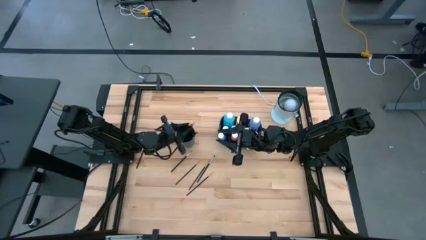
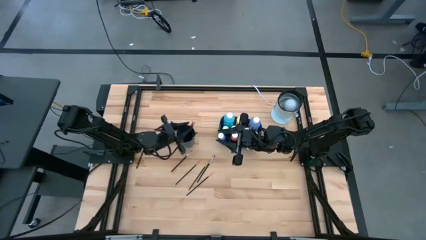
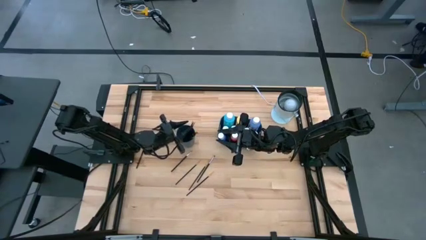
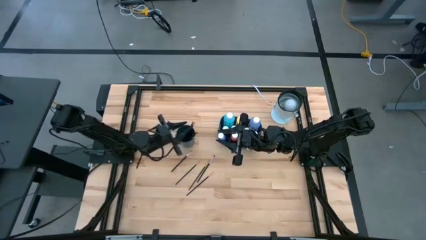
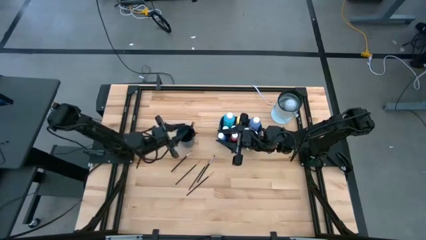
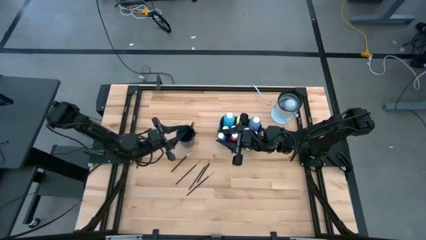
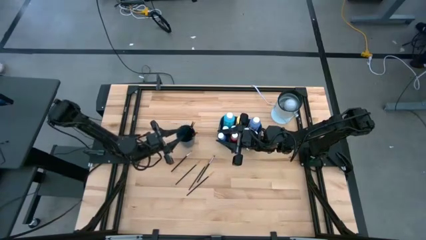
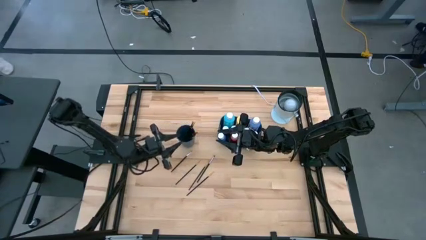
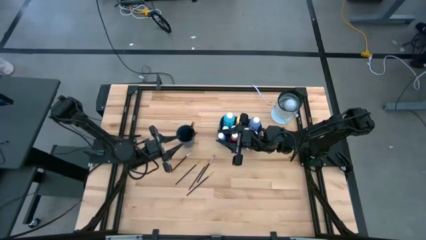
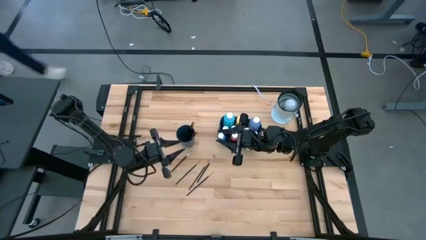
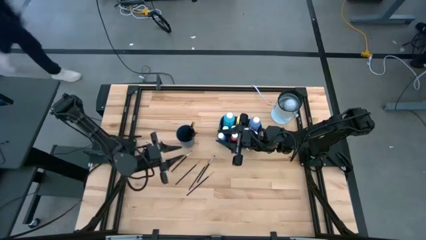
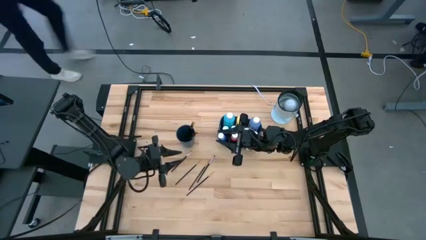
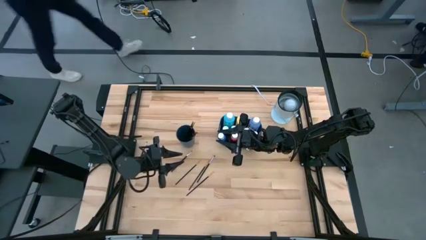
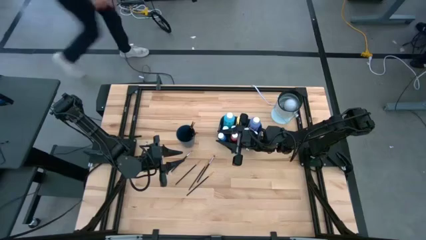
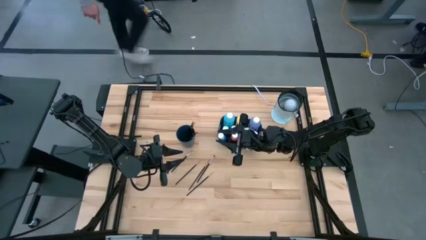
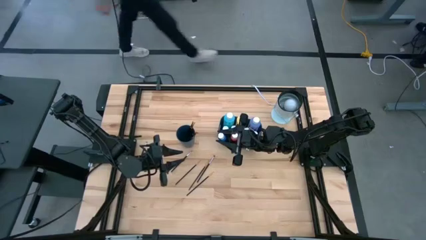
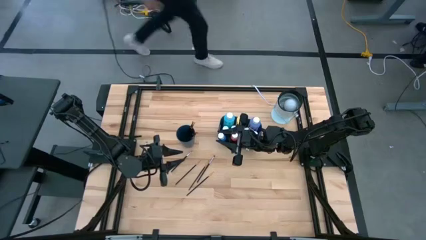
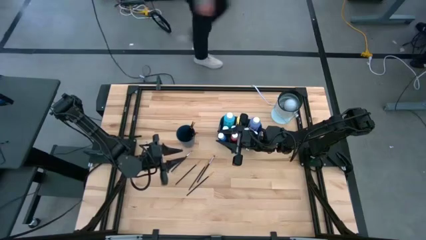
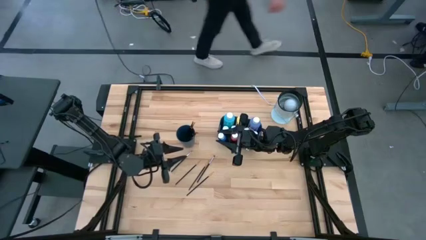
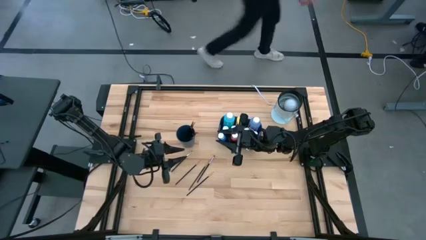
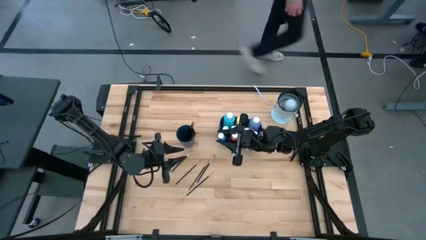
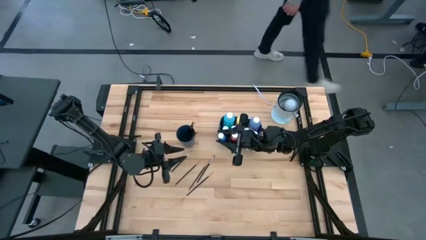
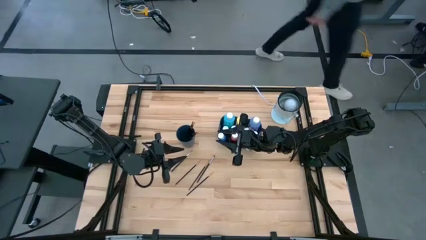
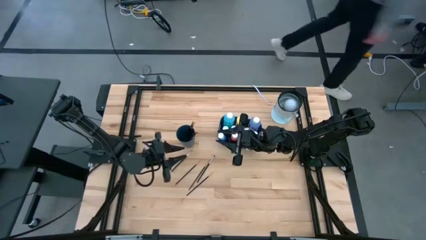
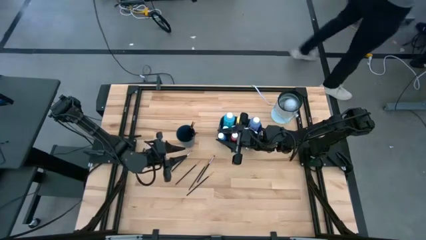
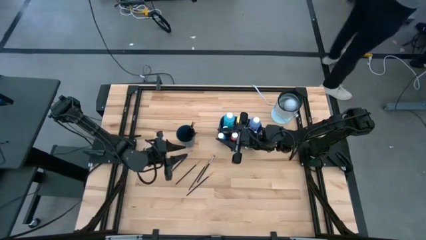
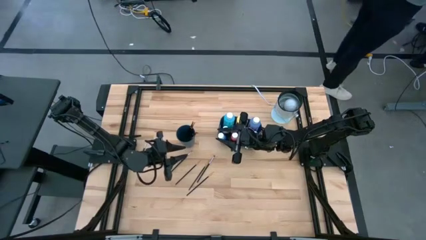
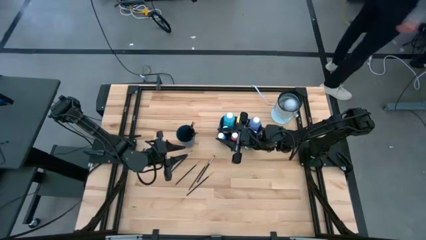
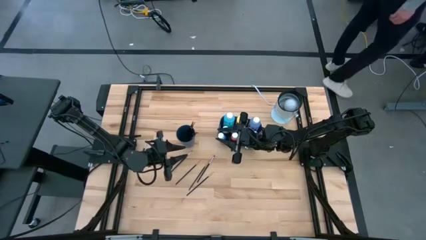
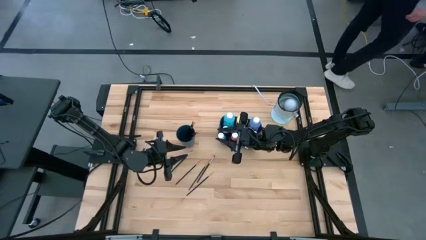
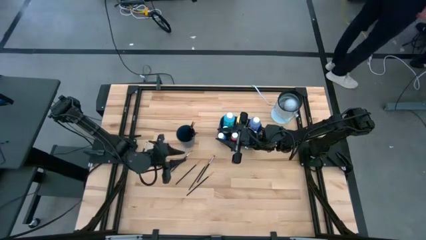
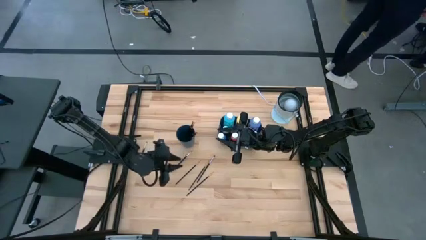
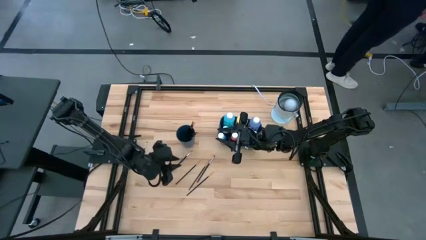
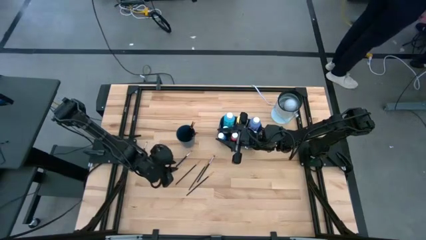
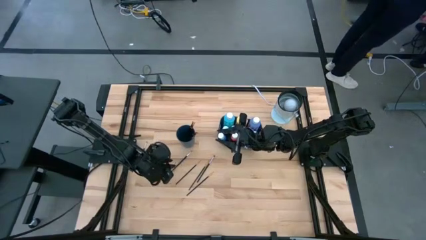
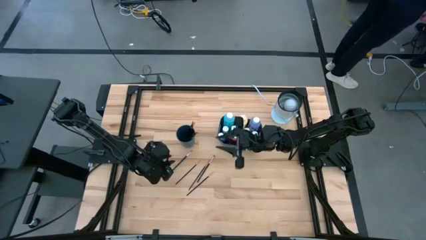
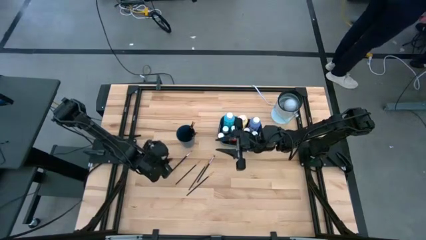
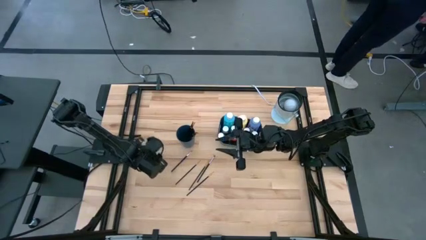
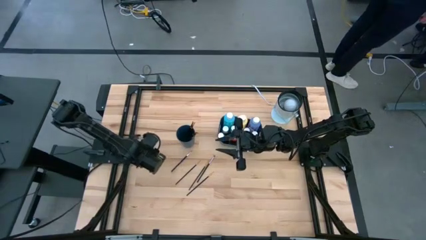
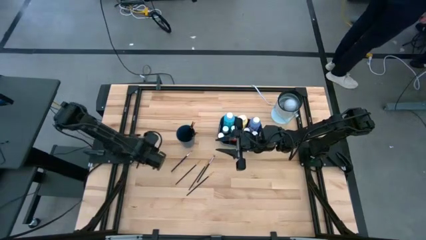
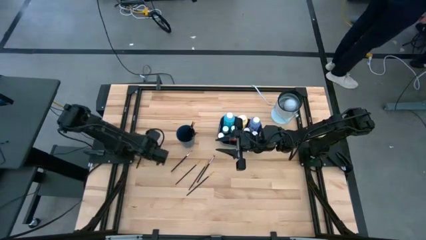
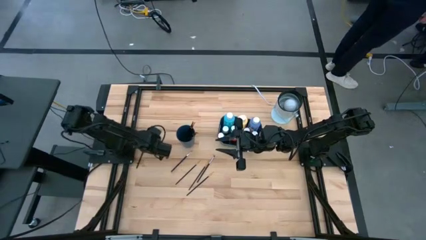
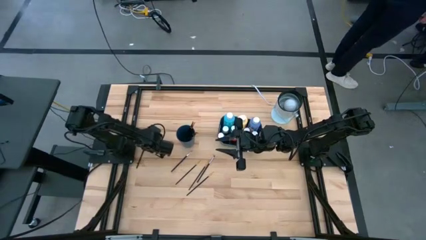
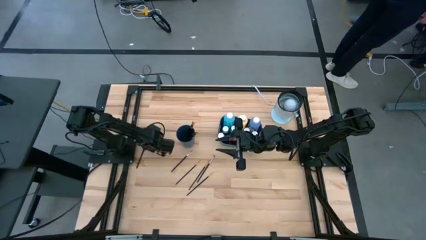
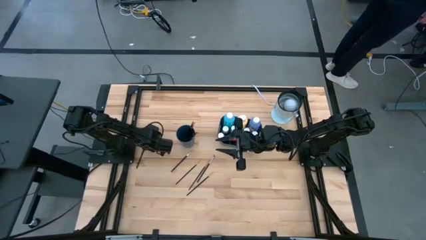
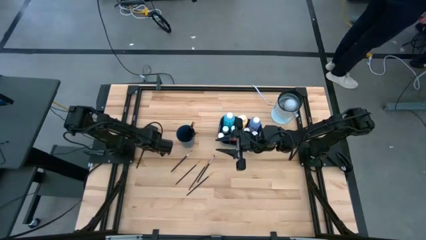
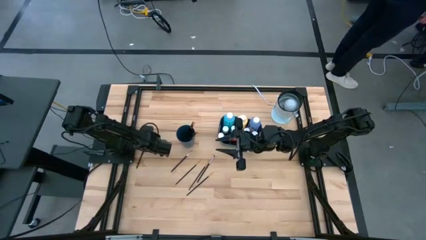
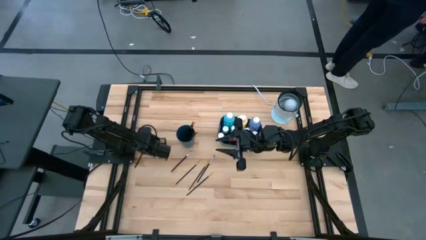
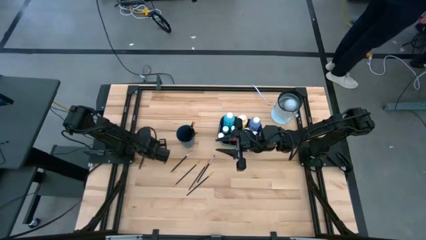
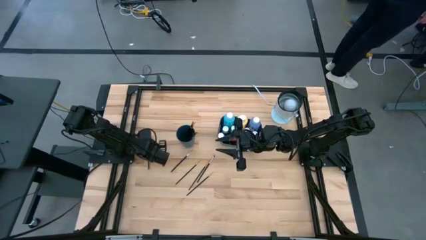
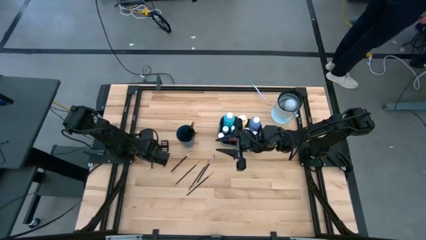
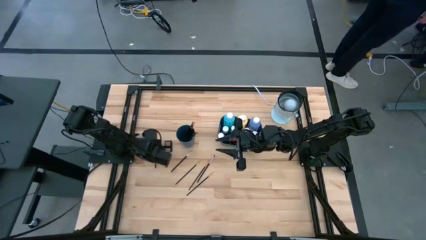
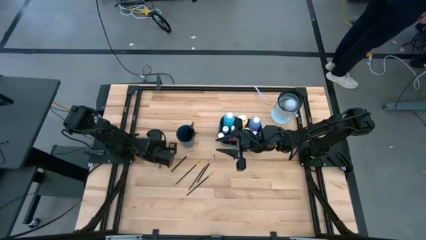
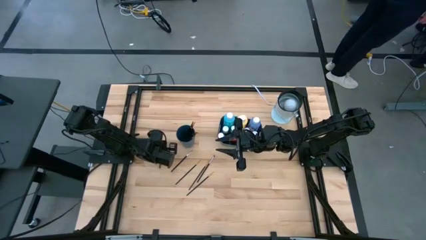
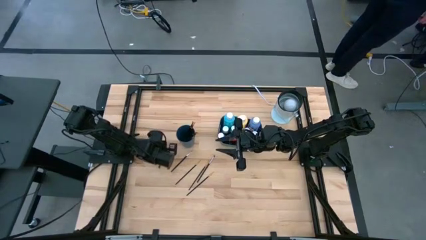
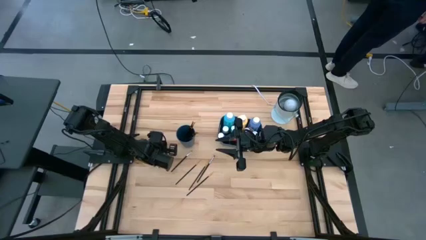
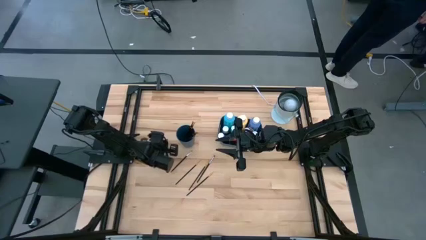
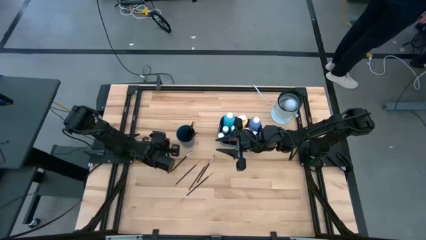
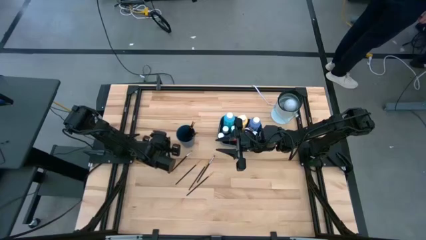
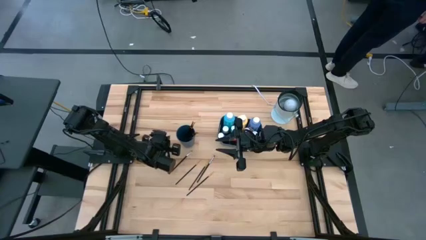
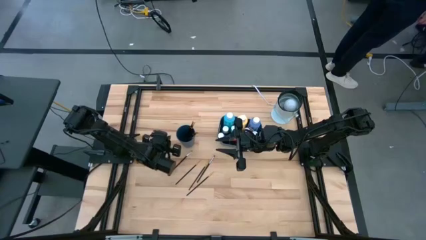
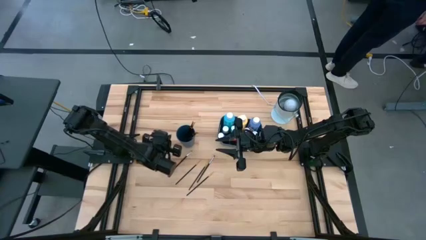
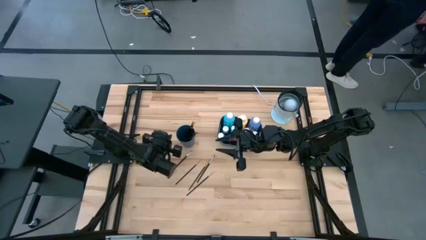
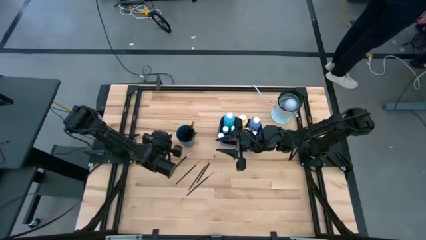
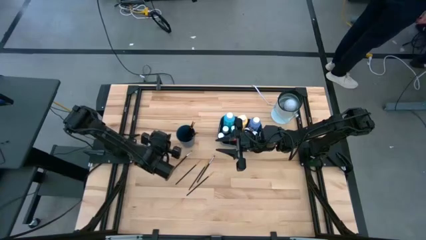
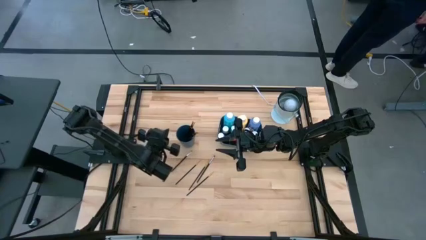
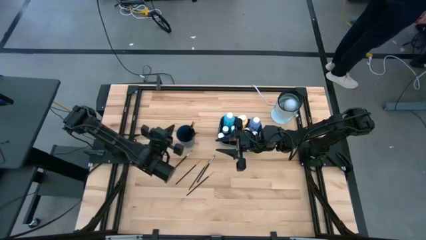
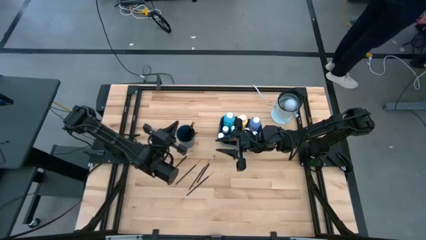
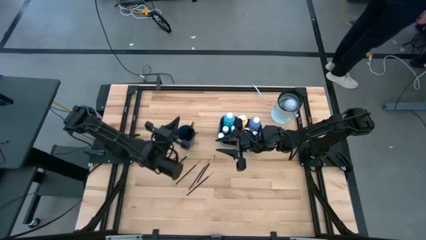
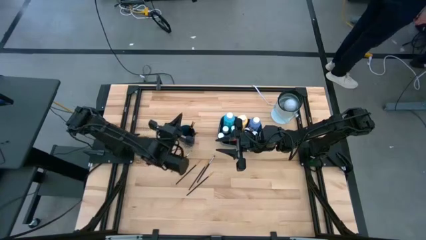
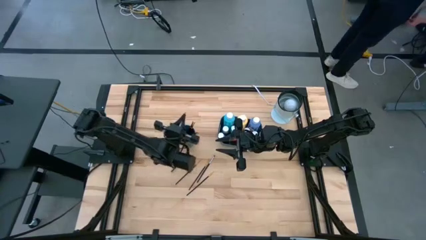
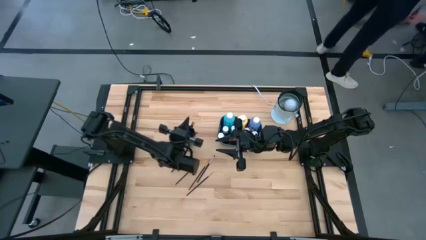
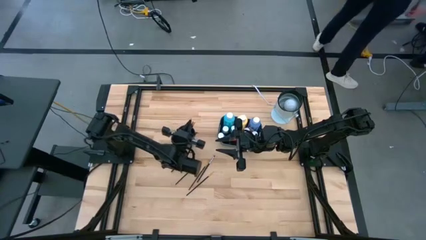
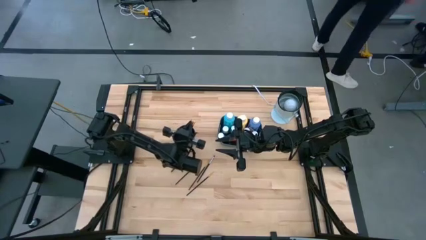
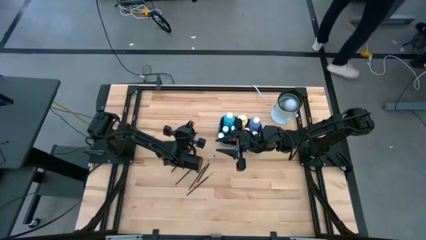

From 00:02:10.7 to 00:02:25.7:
Task: Pick & Place Paint Supplies
Put the silver paintbrush into the blue cup
